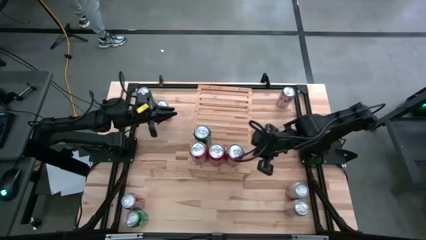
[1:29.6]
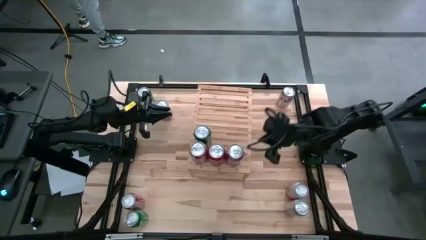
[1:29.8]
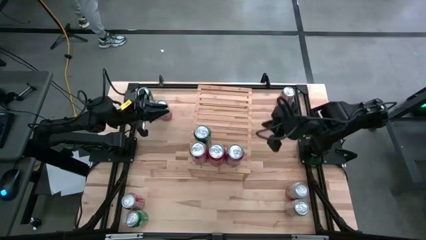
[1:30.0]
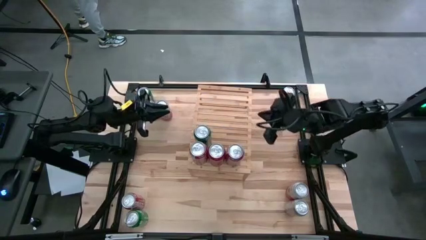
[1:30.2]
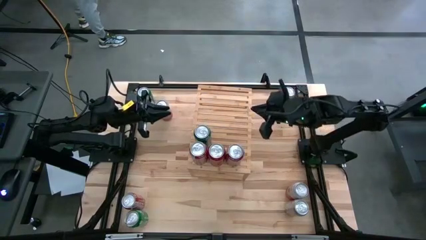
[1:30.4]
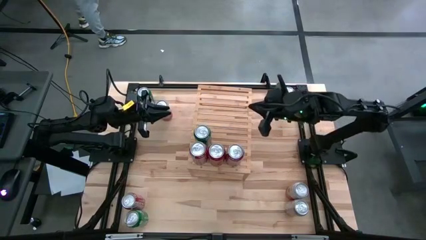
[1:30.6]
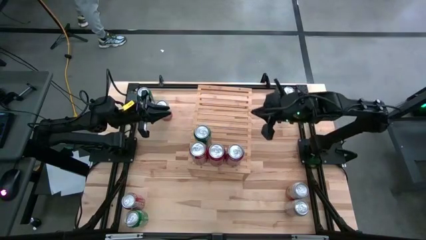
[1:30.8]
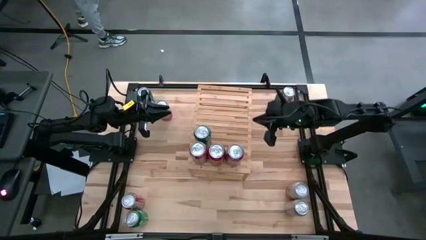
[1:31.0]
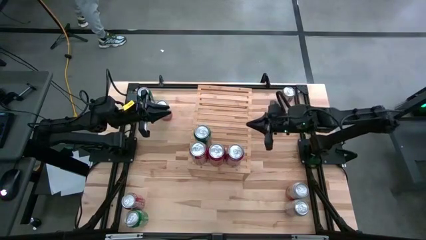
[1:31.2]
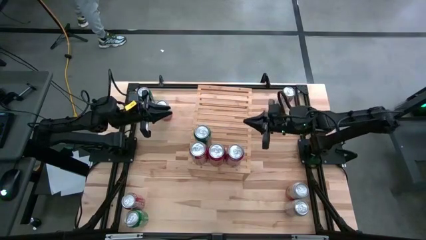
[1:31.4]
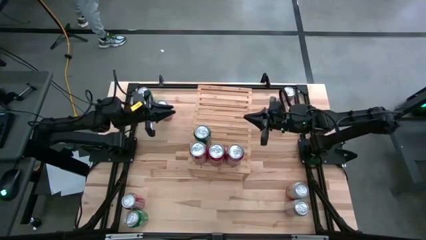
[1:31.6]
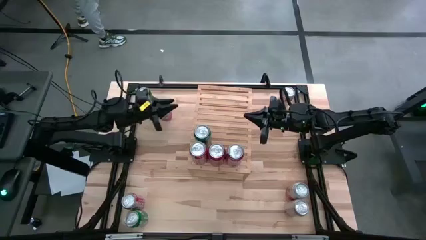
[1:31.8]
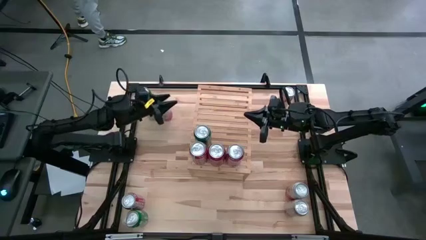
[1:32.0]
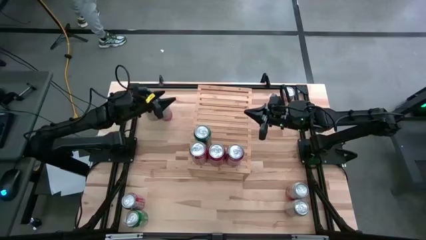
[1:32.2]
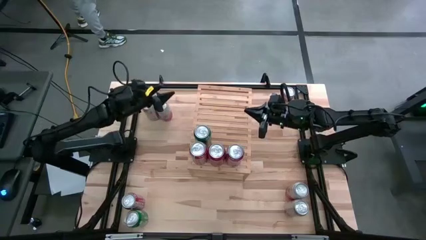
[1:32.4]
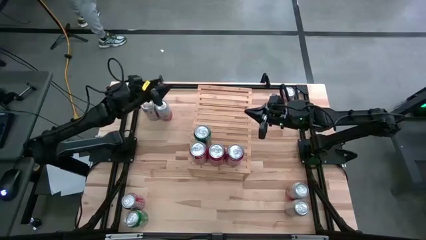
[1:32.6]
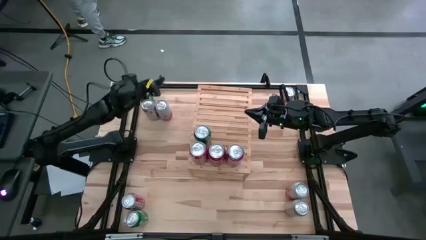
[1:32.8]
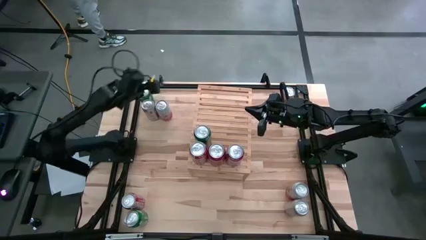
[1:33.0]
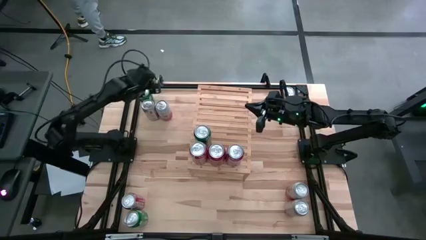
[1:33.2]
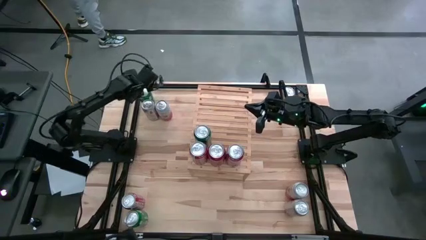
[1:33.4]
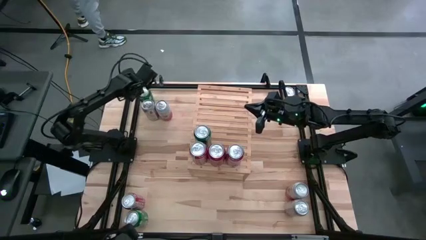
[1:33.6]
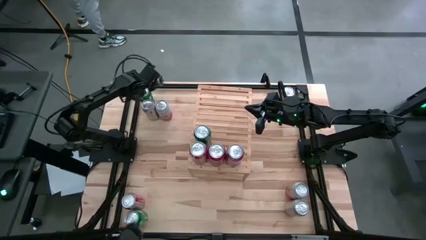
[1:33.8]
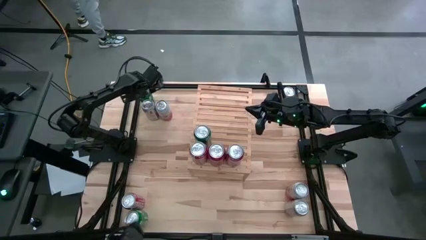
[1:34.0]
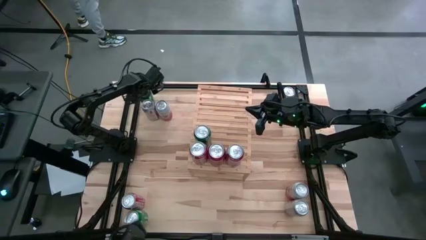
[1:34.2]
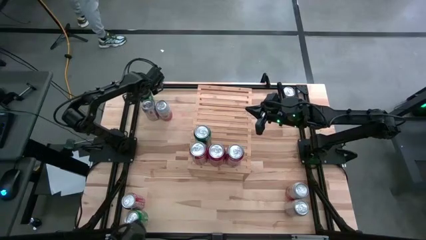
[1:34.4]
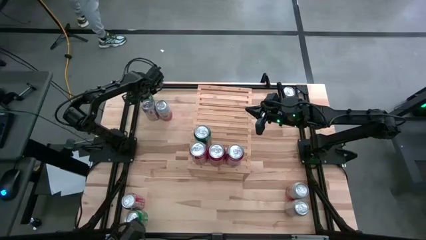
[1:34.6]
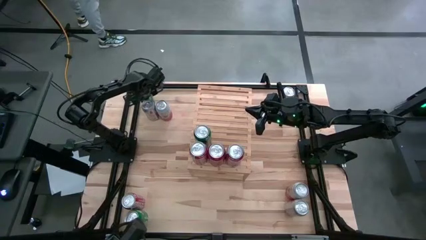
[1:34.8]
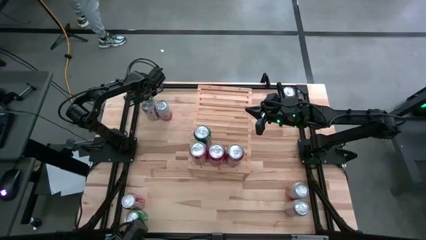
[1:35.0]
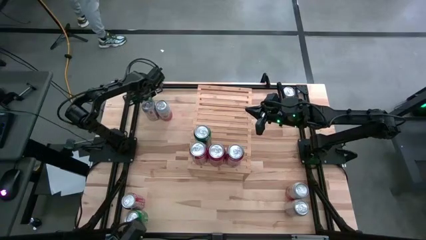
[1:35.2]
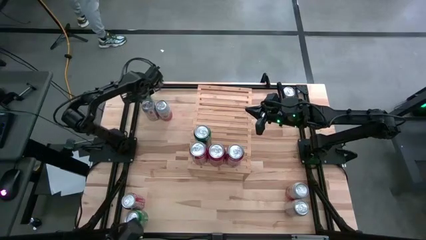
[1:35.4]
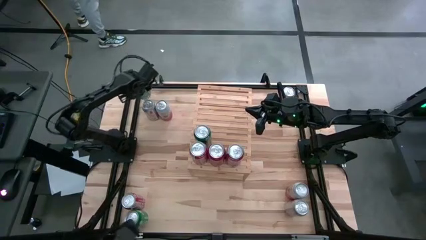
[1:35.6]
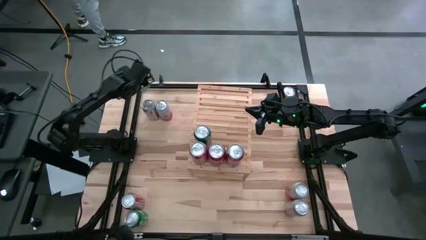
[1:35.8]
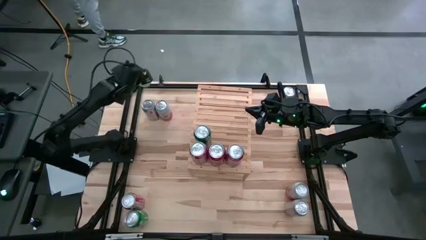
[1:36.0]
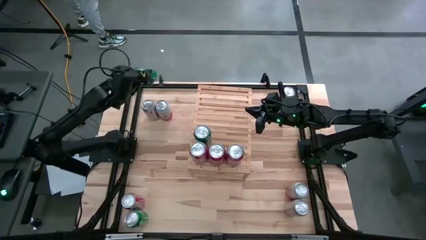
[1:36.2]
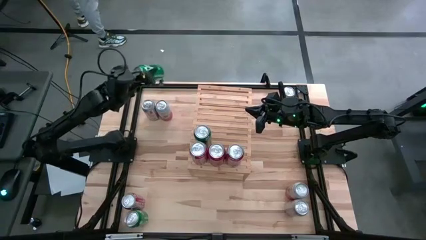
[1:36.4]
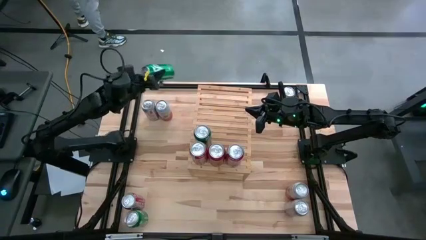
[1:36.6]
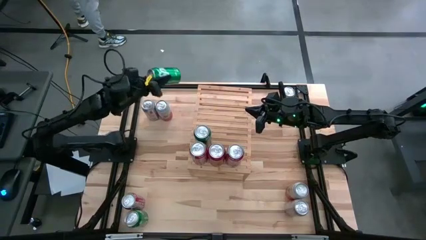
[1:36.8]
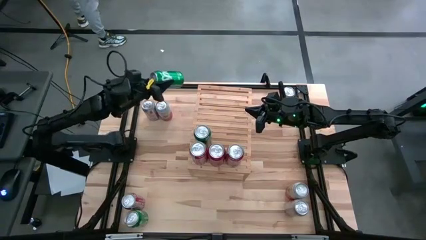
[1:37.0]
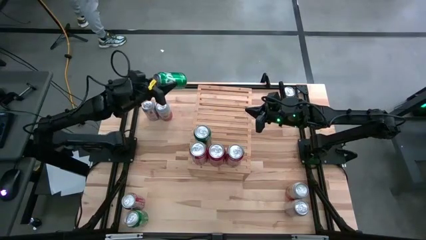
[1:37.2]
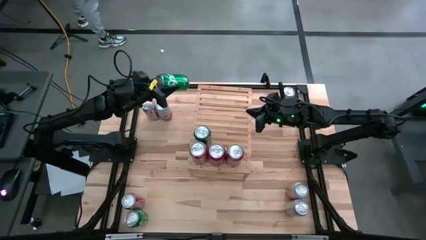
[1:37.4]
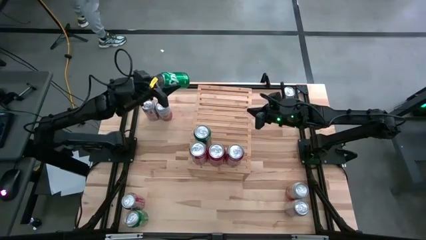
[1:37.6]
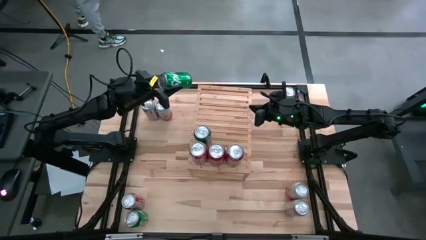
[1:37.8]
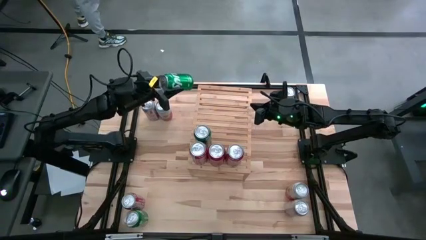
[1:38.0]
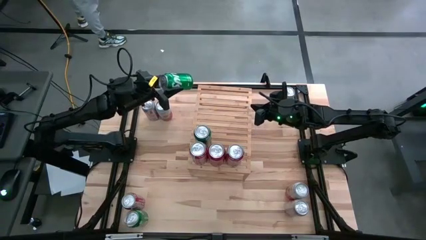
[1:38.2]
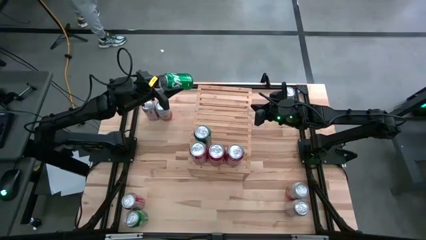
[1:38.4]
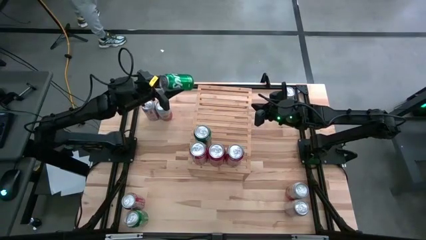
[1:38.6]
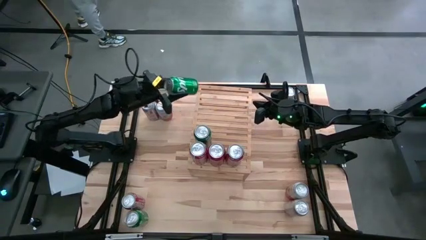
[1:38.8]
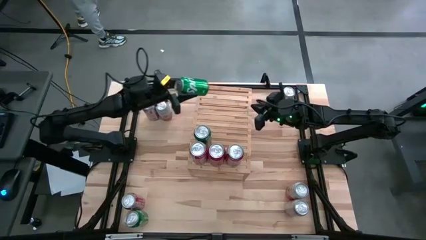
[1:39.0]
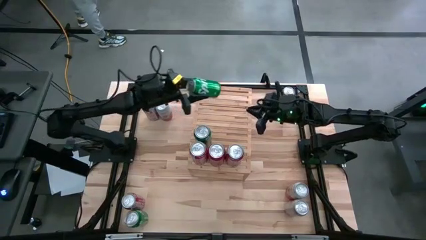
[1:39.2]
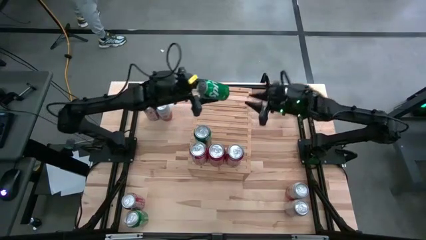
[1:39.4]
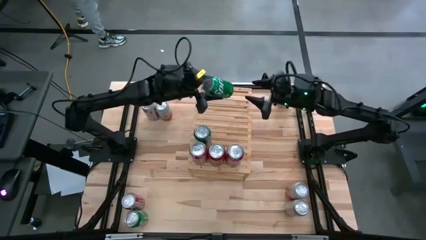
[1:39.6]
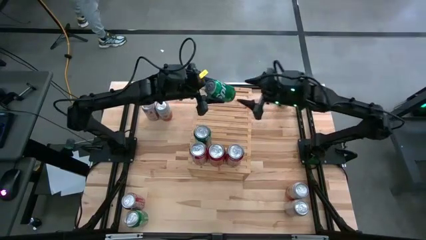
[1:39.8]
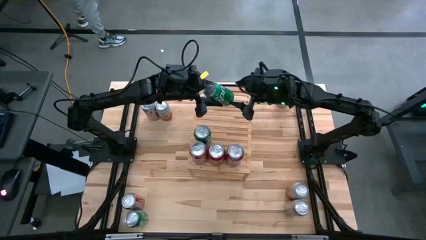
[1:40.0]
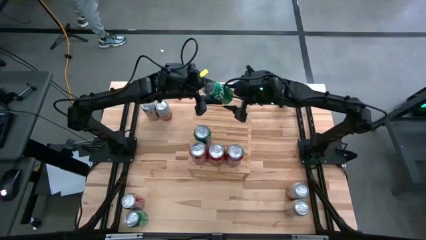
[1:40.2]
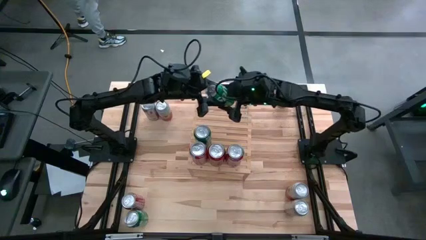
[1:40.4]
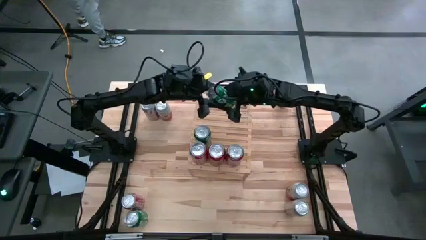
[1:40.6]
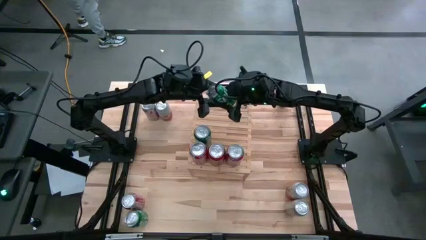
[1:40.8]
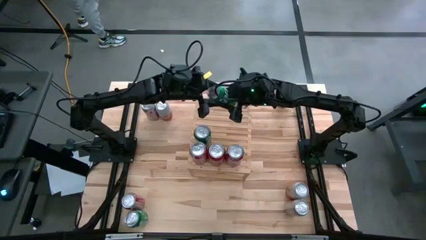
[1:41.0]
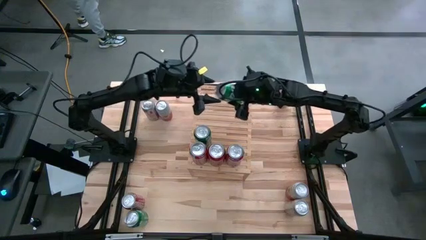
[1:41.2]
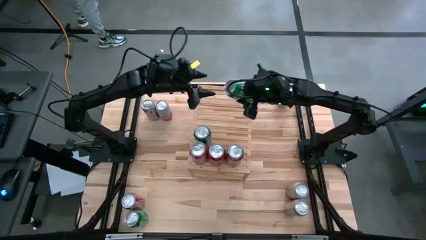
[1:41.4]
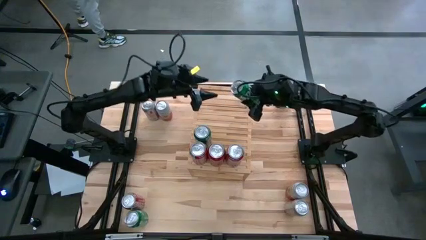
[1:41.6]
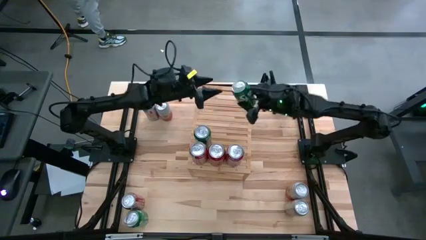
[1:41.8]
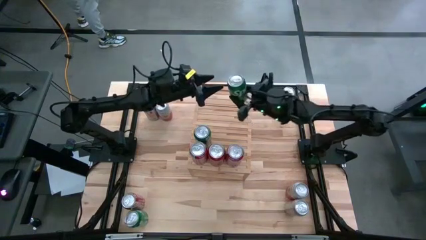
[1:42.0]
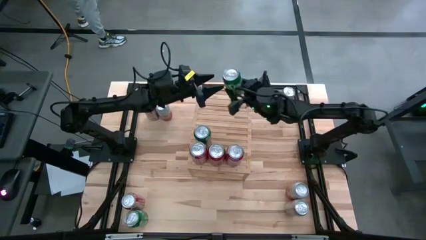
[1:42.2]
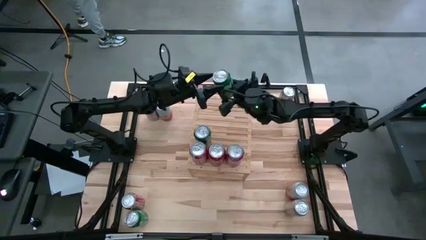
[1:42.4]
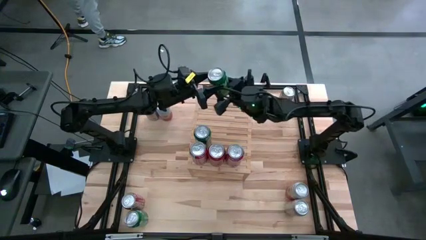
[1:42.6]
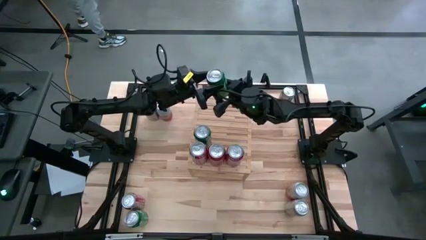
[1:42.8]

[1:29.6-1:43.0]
Task: Place canned beverage on shelf
Put the top green soda can on the shelf aligned with the other green soda can
